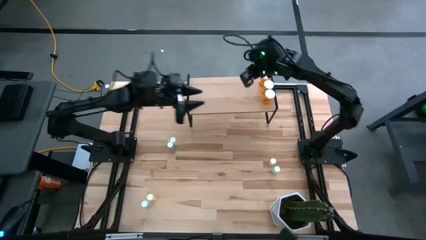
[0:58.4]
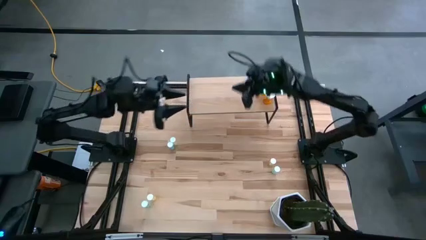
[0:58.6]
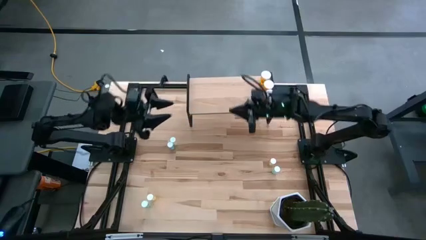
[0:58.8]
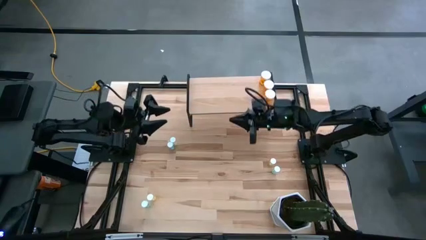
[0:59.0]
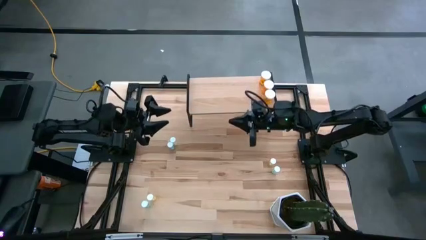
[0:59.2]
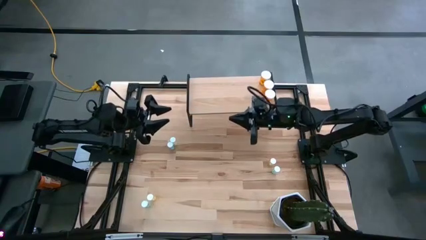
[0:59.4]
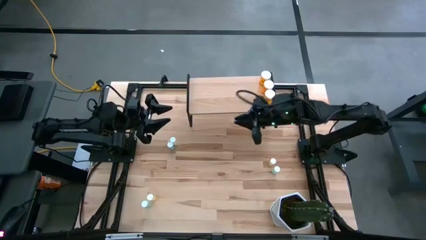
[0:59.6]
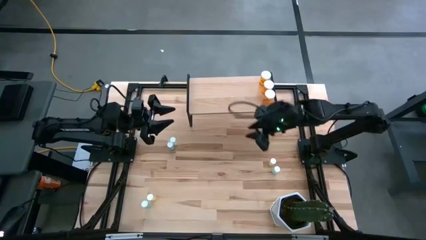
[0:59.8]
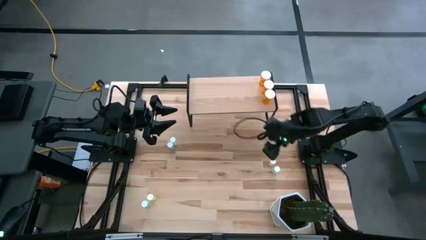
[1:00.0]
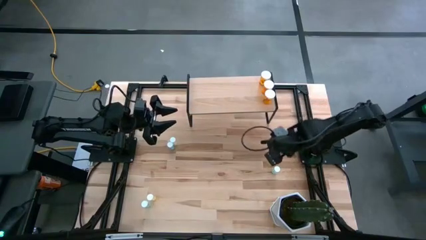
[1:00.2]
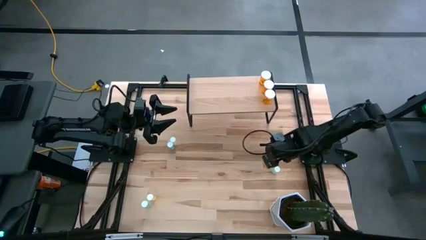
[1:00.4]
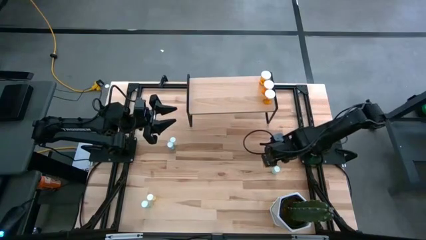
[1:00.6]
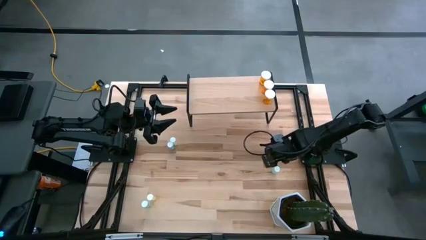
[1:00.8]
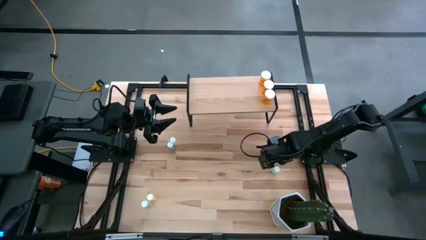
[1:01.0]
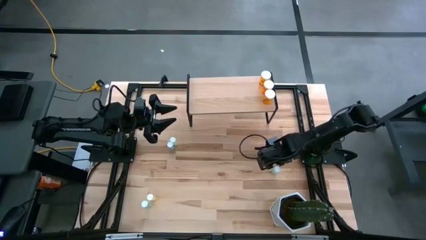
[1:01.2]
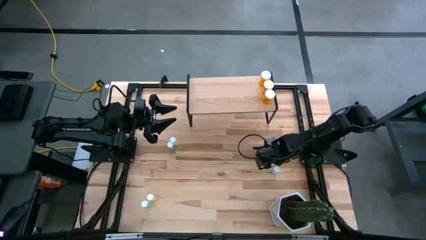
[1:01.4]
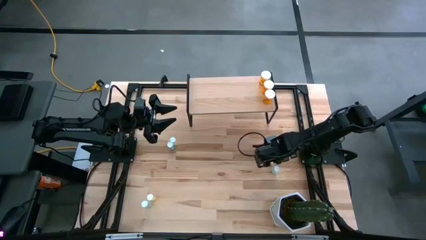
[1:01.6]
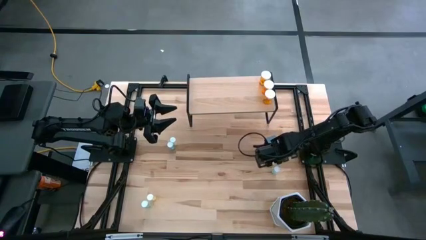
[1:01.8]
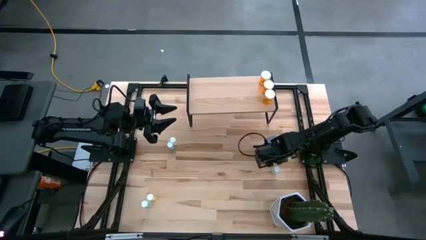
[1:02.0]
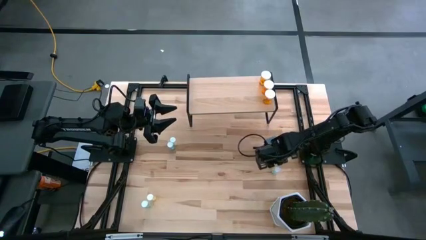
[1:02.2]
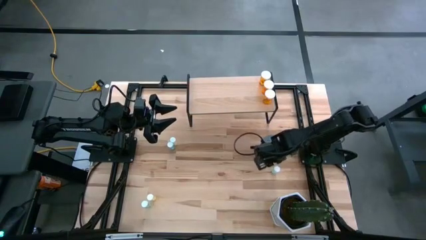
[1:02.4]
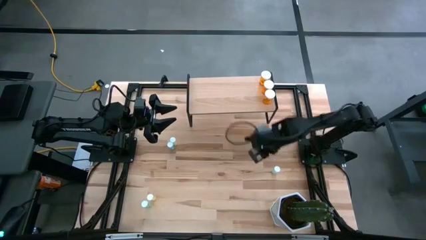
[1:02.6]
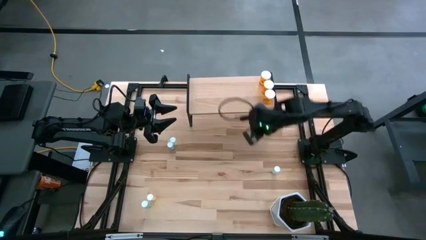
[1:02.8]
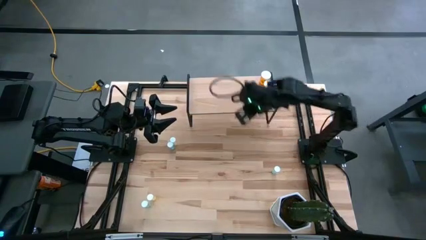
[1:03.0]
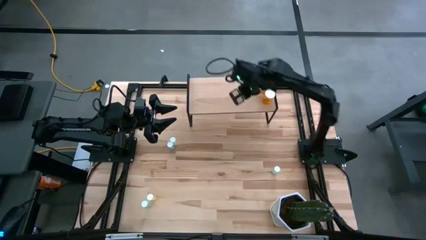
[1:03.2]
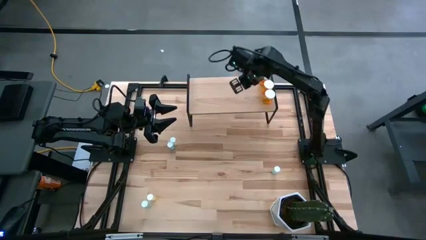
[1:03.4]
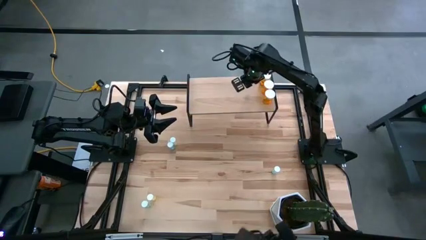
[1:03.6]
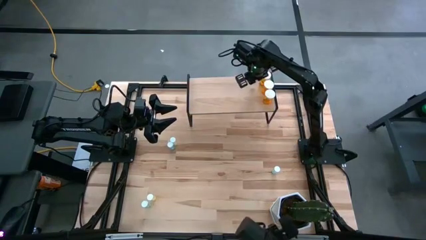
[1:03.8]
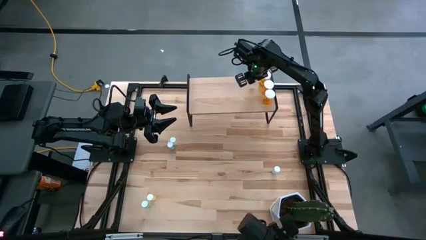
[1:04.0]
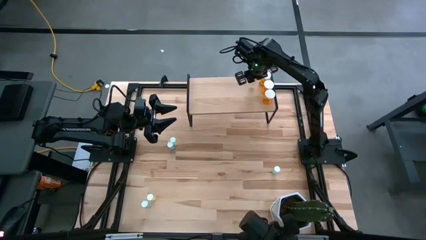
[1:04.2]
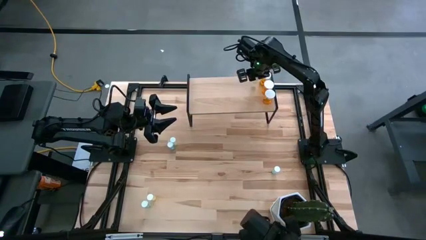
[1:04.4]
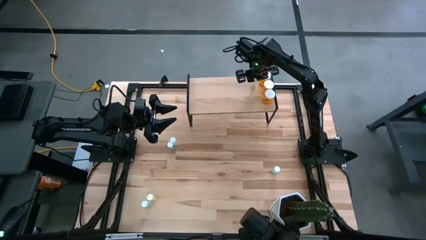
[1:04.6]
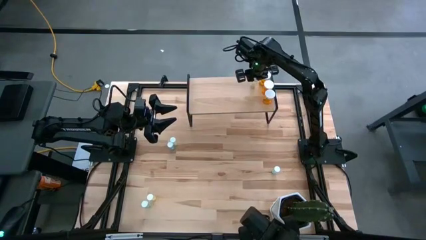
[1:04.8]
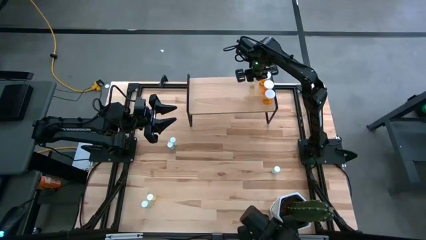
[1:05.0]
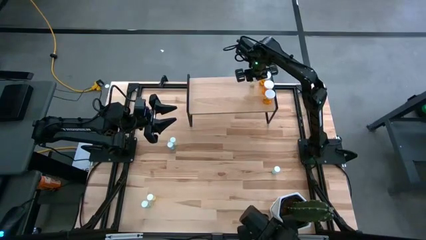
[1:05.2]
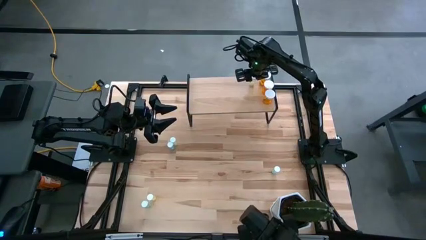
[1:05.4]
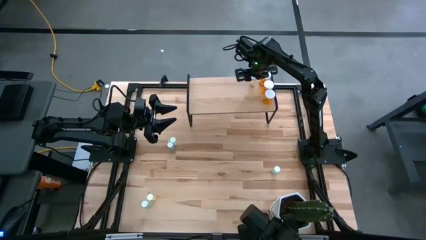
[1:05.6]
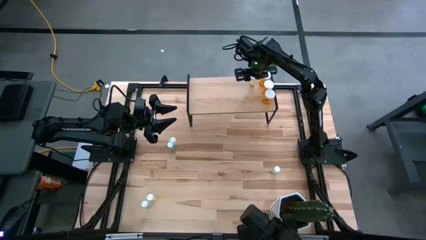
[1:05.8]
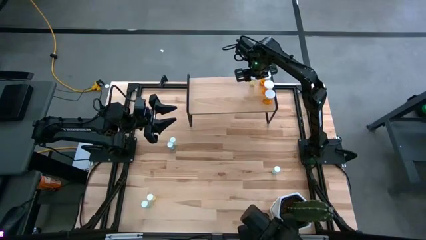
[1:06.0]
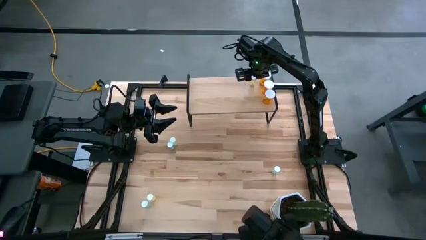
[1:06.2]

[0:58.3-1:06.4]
Task: Pick and place medicine bottles onto shelf by color
Put the middle right yellow pill bottle on the shelf
